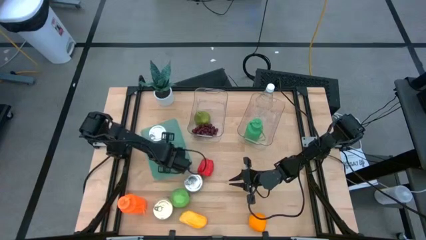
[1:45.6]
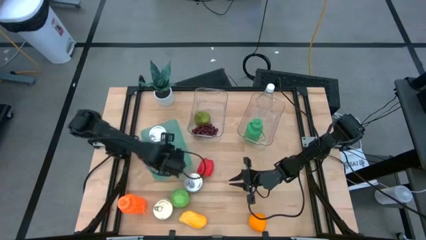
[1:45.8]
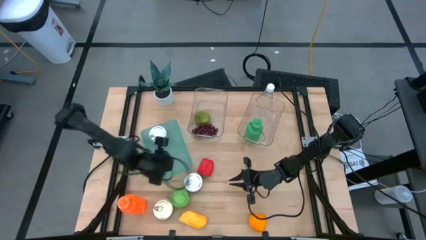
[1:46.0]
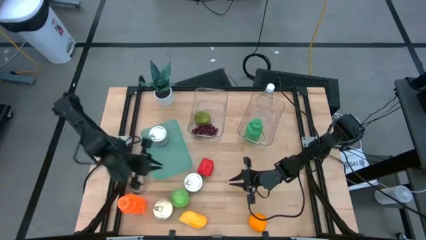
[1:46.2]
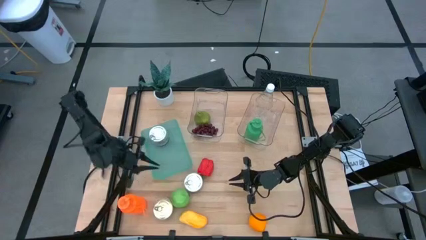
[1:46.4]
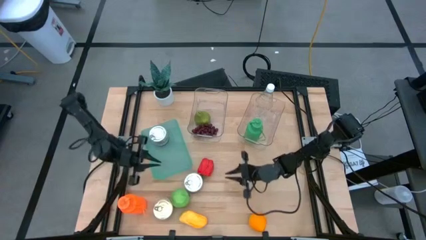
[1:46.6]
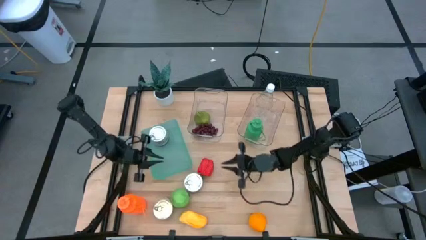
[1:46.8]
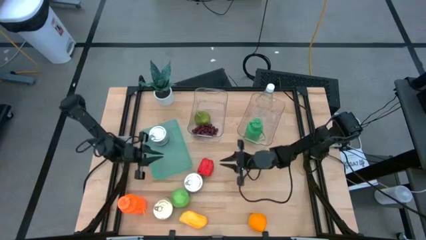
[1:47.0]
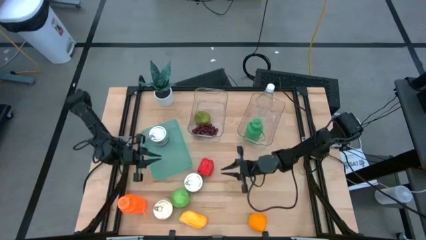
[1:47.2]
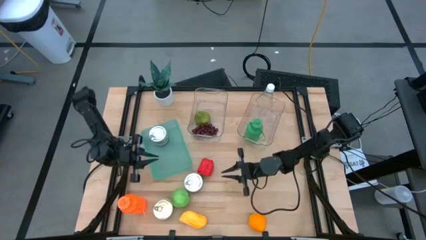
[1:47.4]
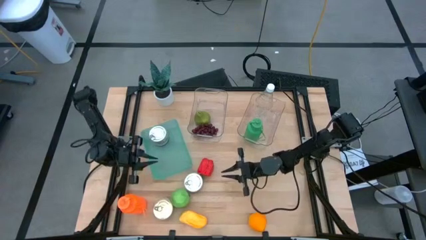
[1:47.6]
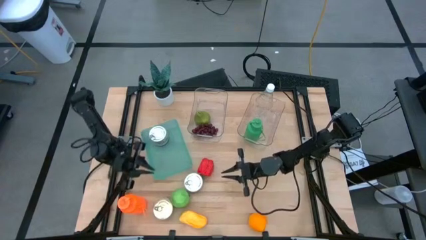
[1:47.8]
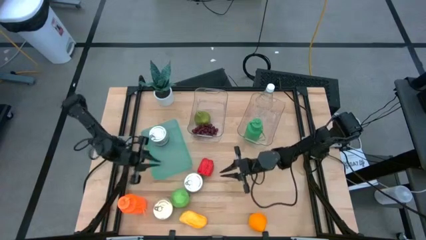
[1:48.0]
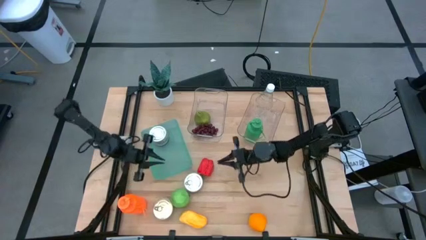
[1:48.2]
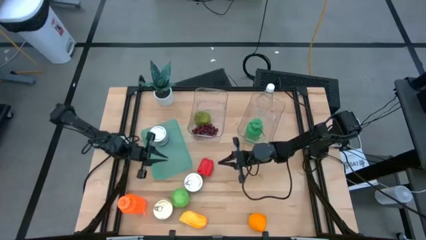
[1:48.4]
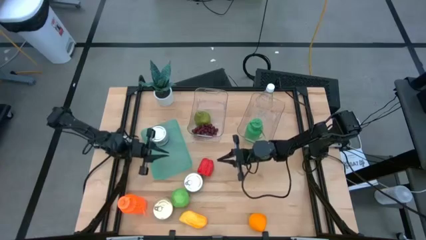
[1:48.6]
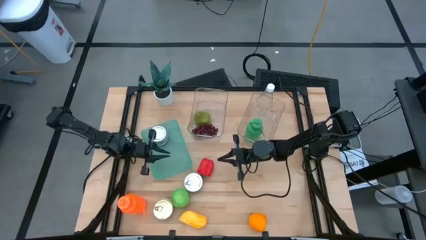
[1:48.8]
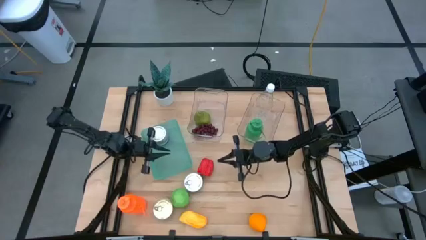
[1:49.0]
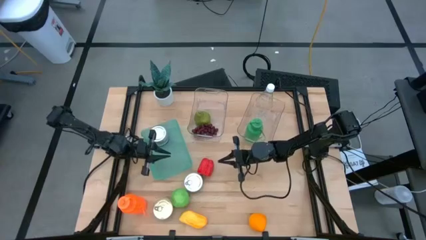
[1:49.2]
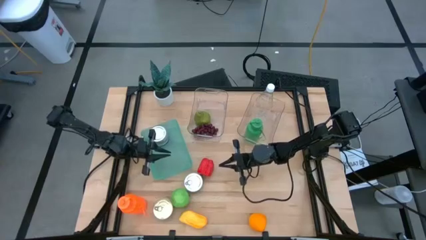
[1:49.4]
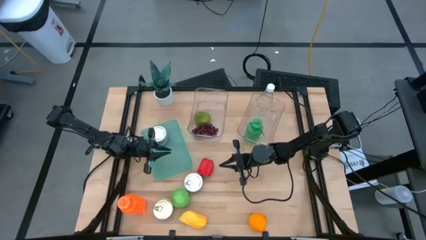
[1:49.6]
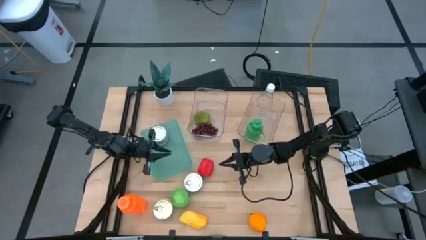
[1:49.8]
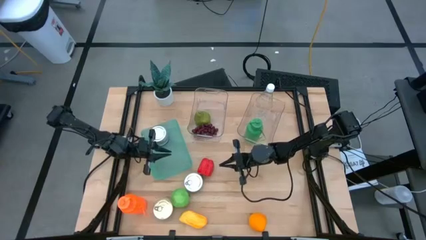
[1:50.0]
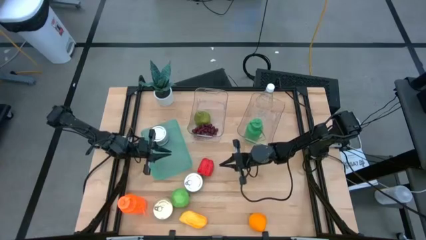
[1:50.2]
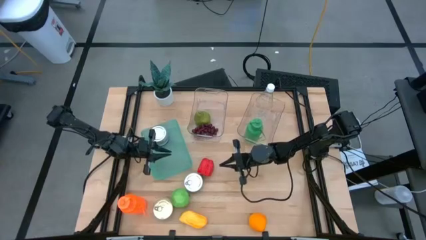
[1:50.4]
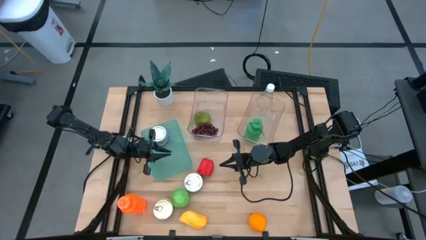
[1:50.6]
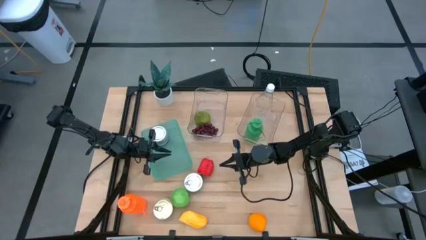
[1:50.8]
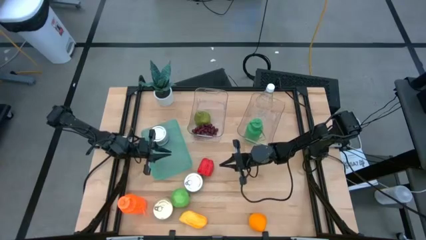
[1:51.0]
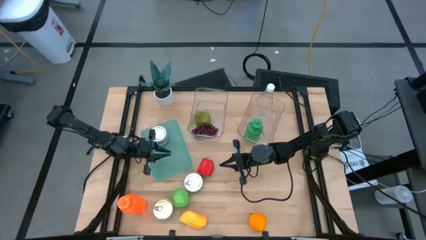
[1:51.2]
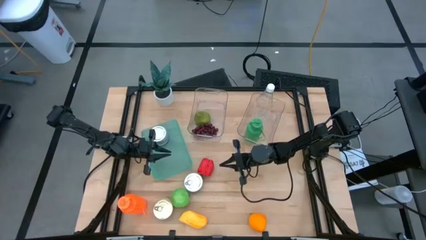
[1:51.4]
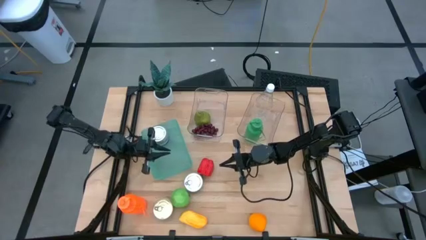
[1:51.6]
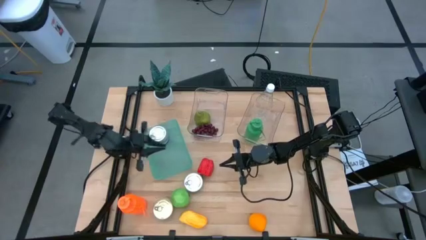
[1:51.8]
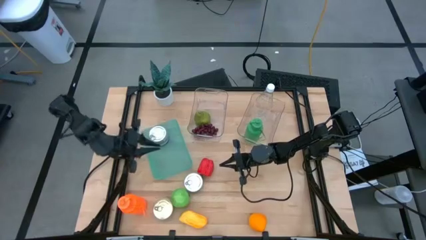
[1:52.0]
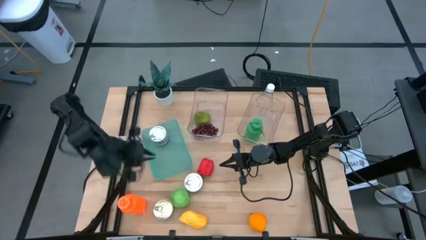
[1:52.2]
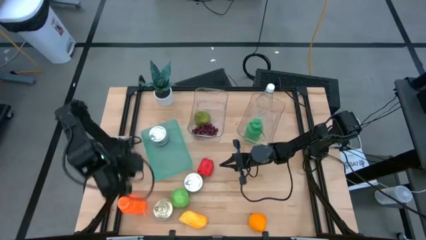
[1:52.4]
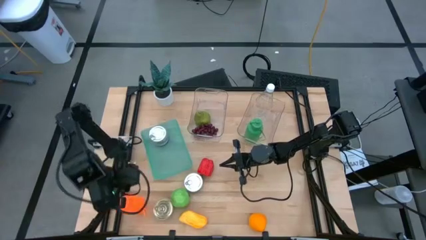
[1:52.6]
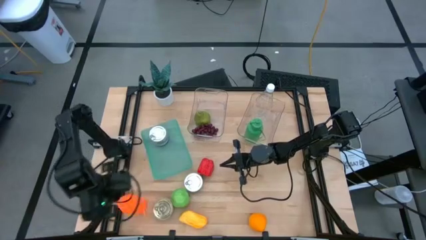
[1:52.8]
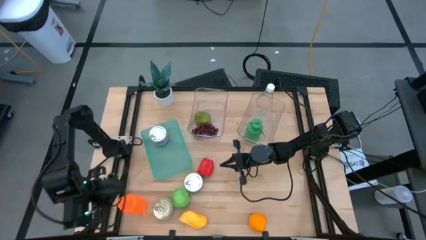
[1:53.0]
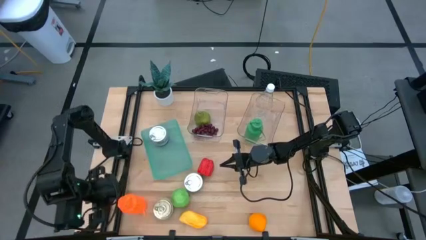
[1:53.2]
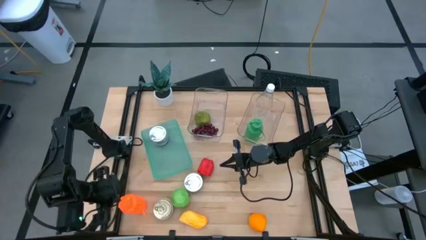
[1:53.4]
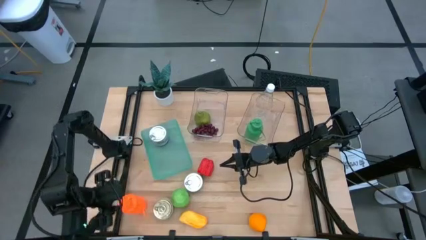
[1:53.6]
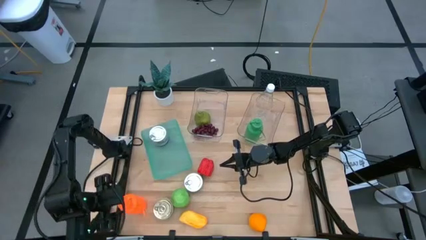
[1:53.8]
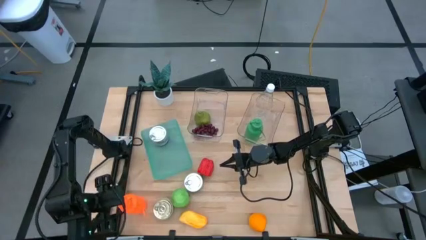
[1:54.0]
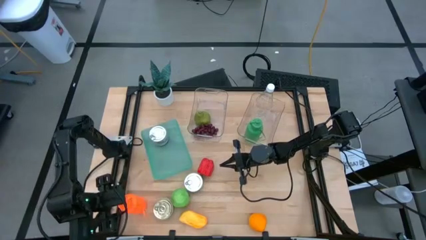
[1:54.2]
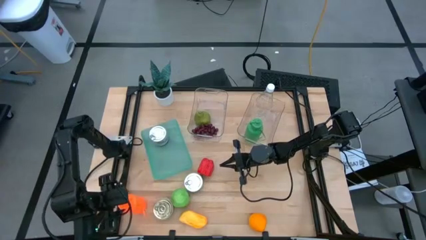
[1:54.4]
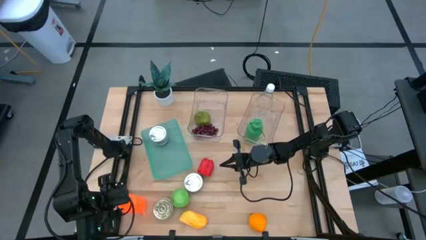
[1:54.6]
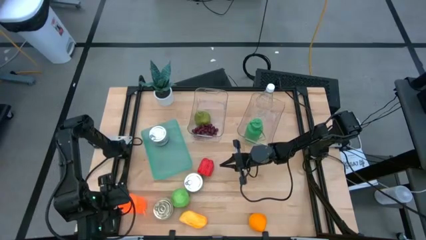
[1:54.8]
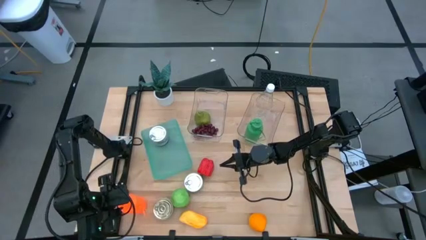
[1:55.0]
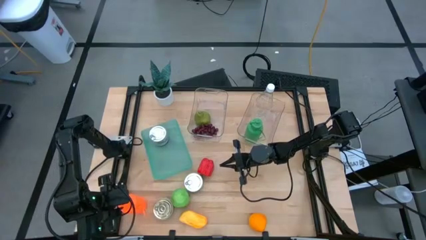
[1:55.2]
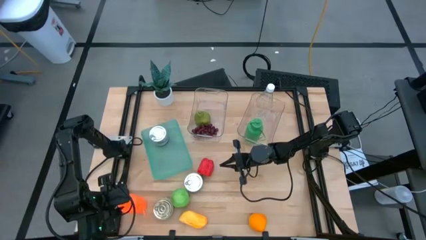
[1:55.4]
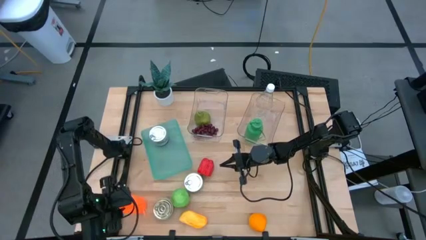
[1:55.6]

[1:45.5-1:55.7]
Task: Pick & Place Food Item
Put the orange water bottle into the right transparent bin
